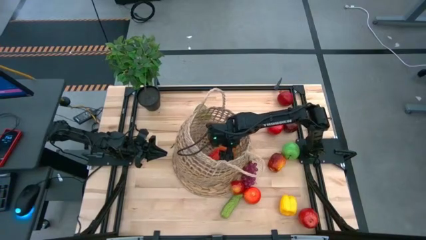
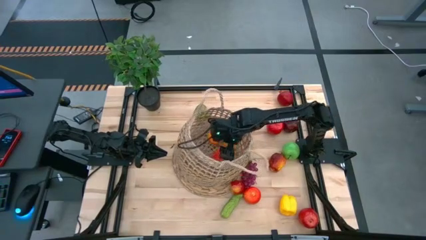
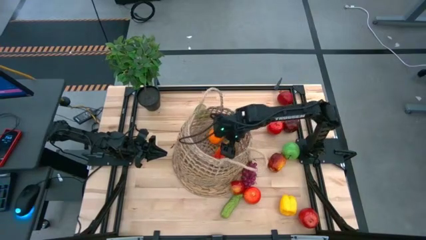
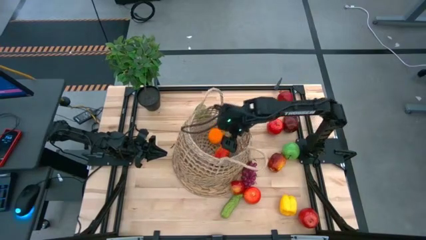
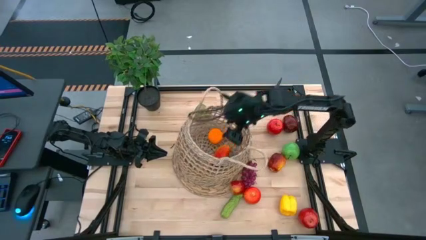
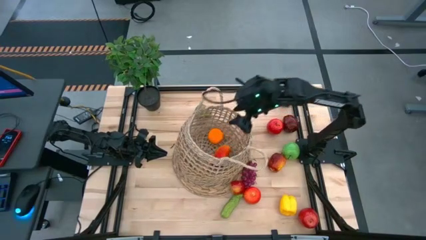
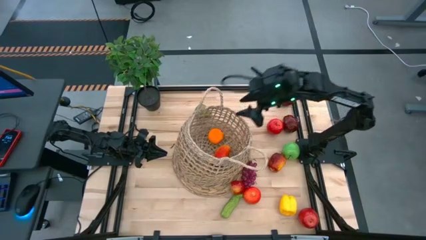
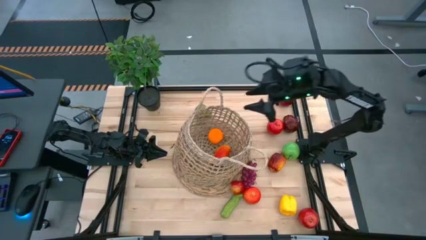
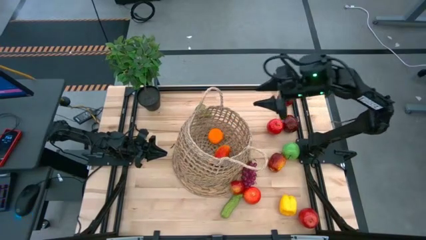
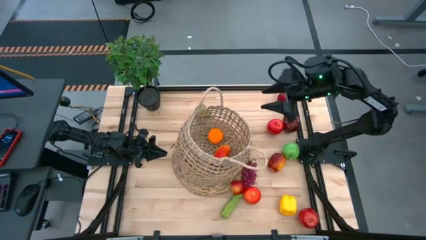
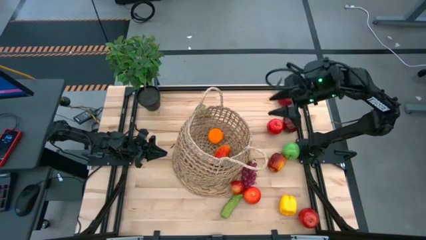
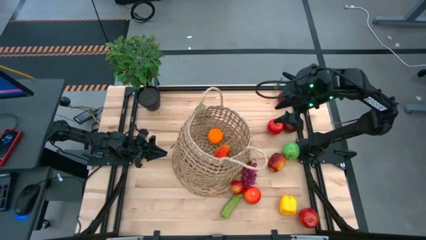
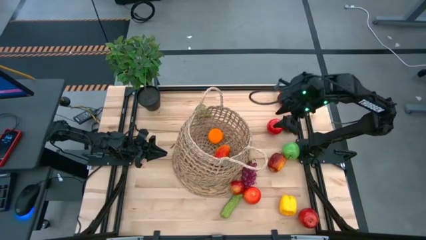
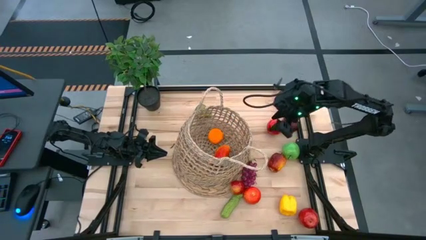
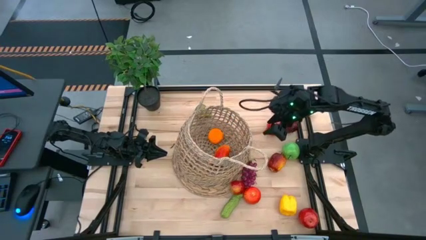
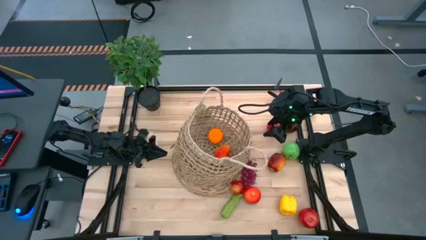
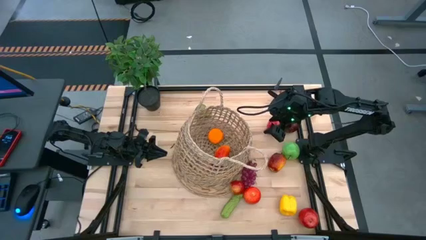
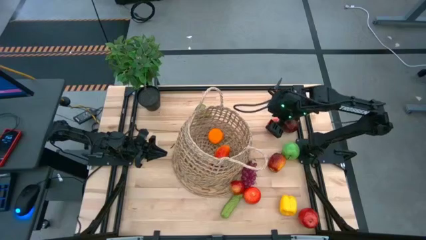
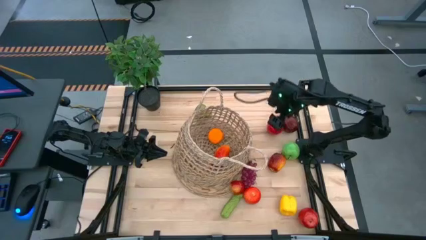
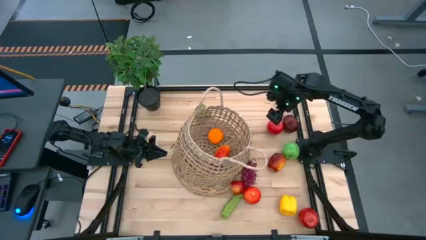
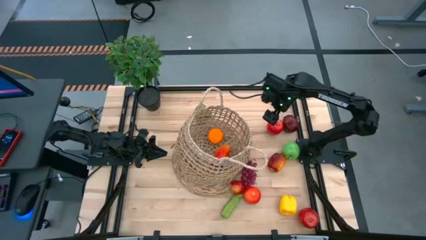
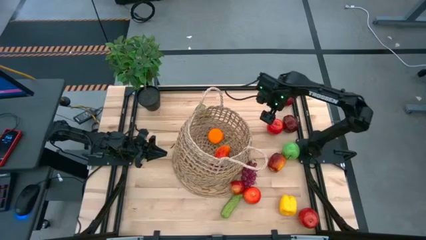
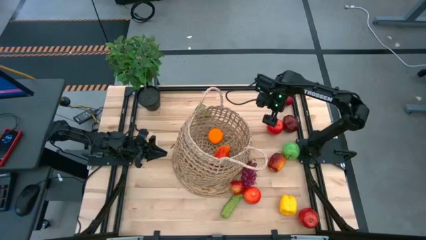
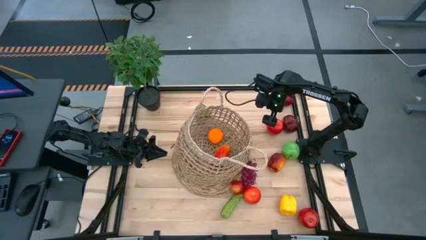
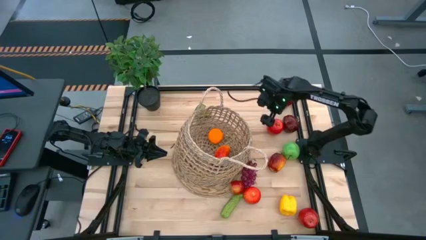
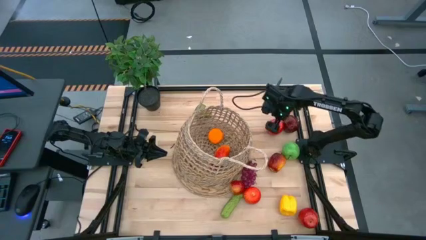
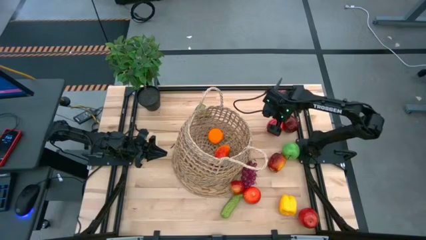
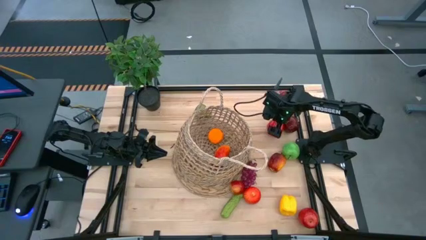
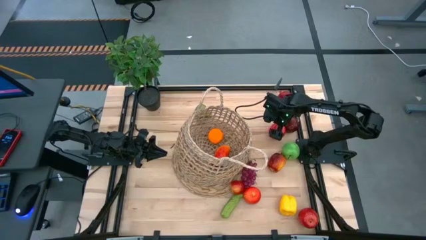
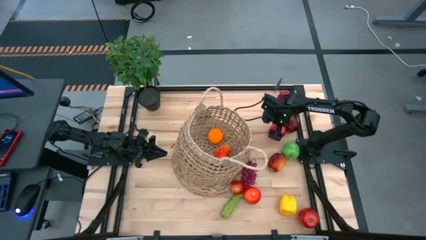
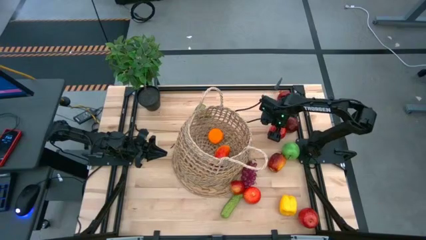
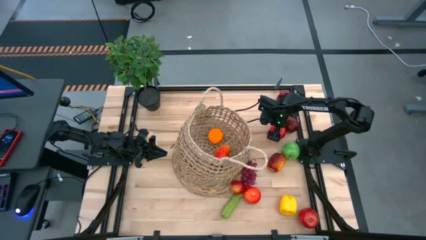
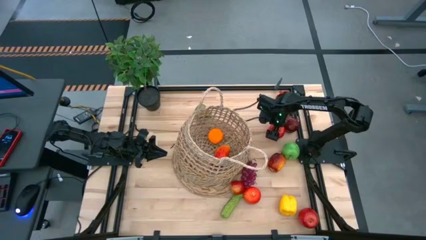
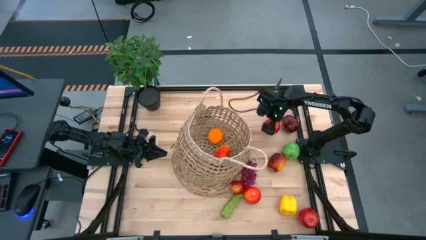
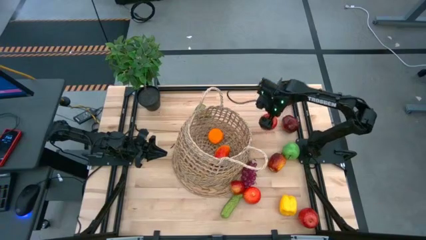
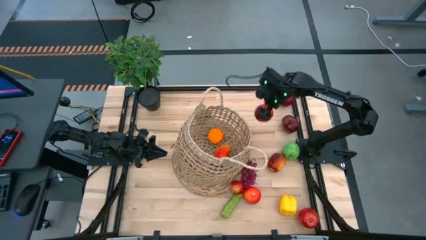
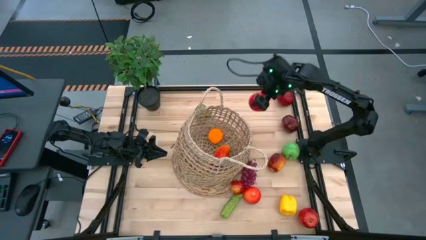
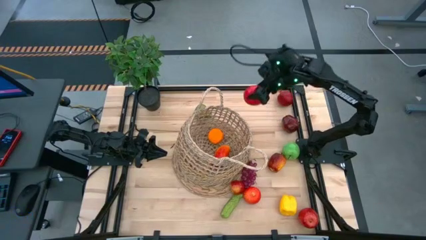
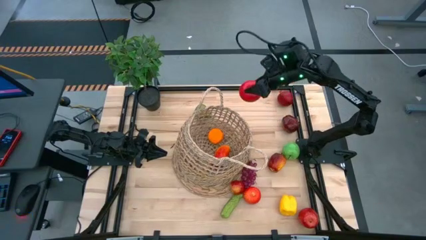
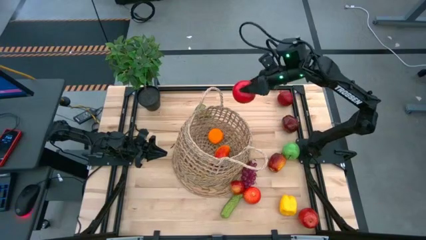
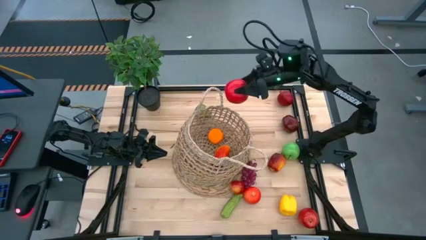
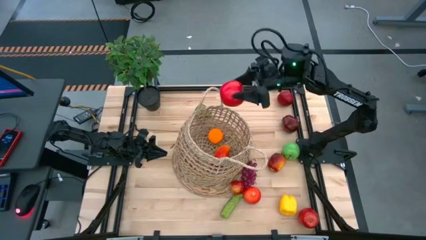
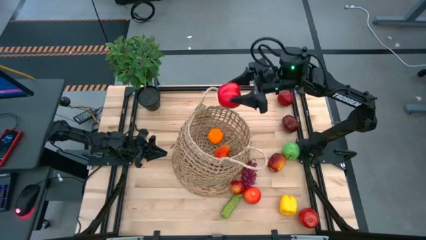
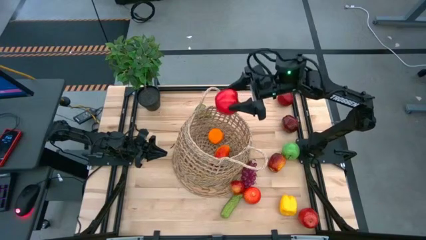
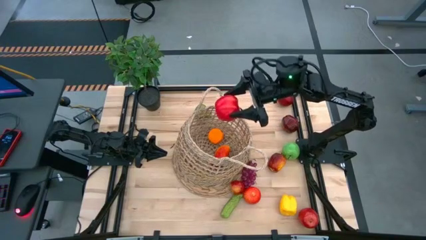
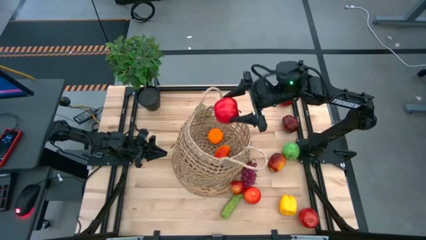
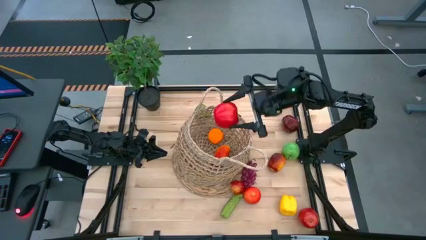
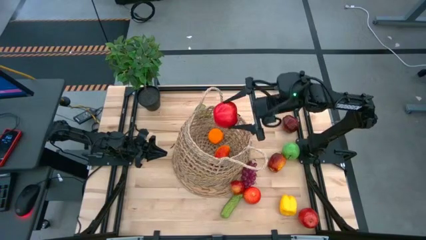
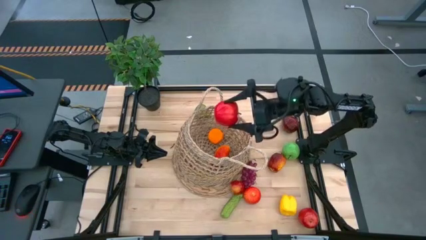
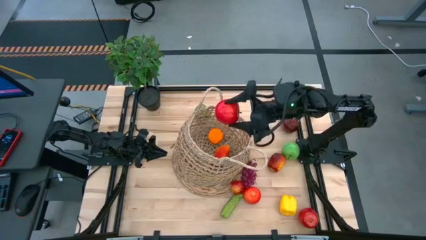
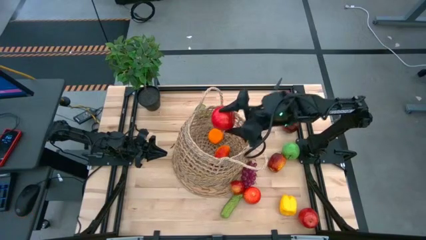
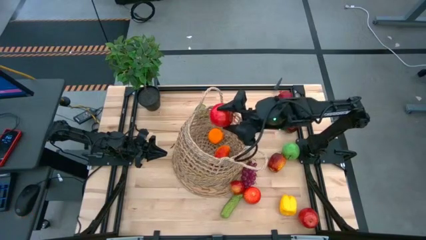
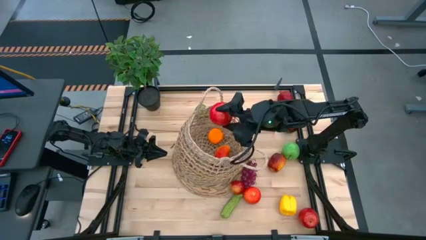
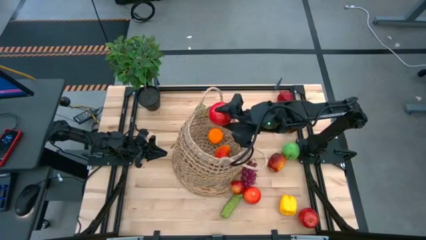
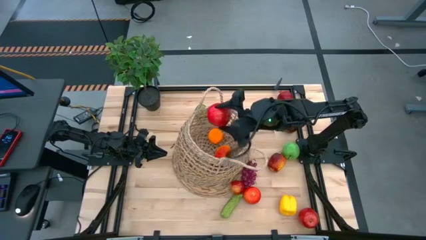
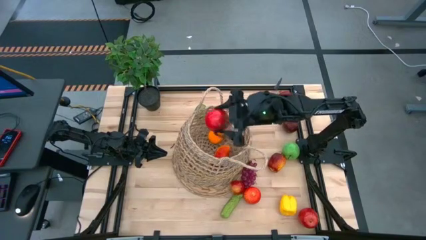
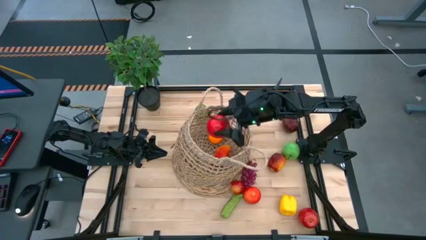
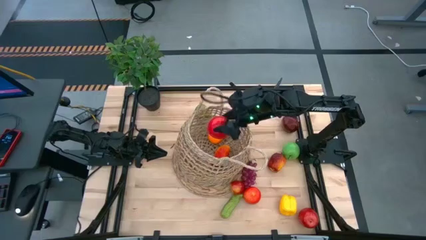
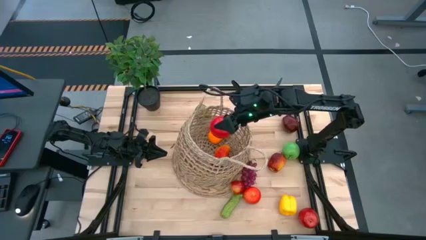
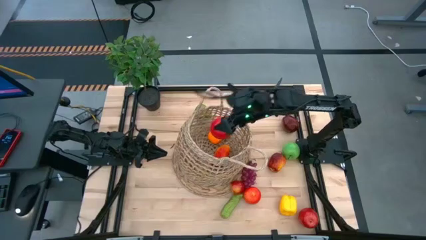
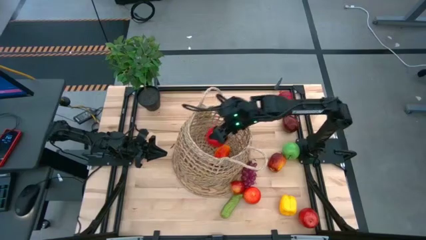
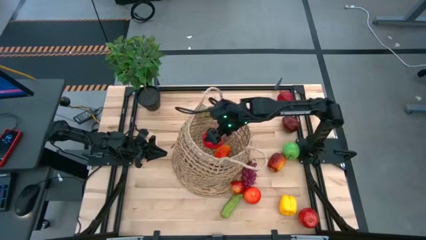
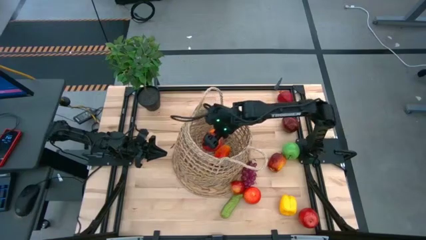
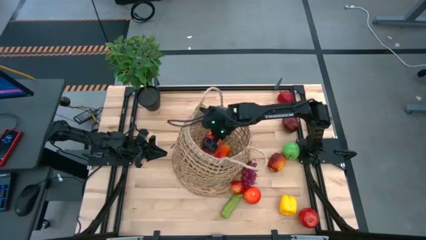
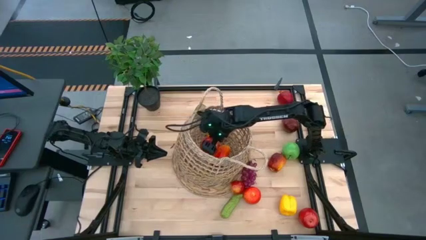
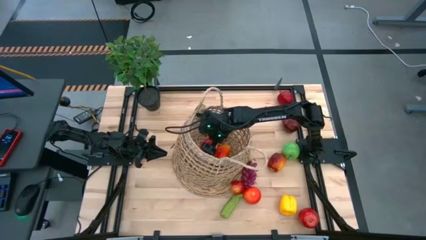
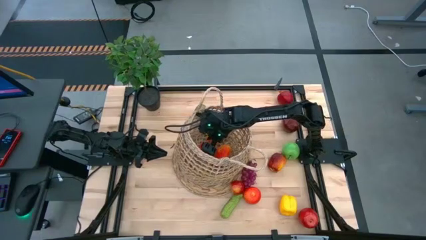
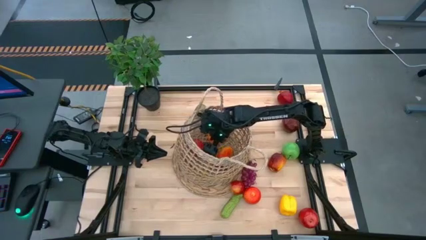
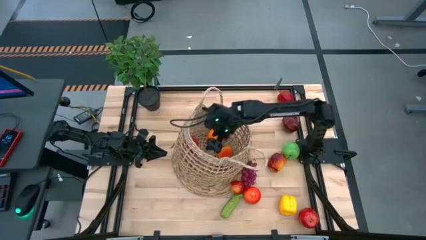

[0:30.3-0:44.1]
Task: Build produce basket
Put the red apple into the brown basket

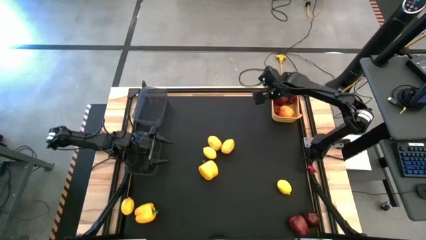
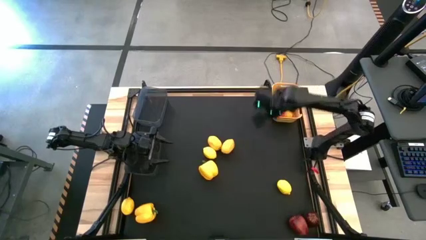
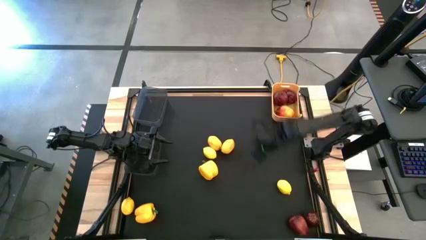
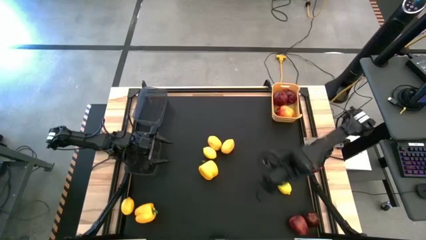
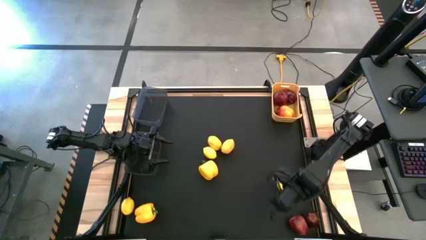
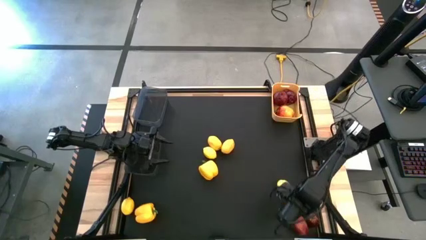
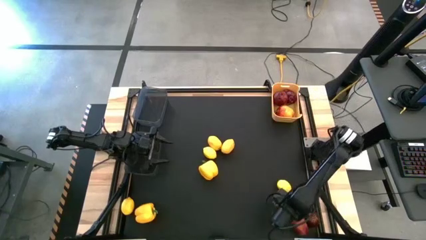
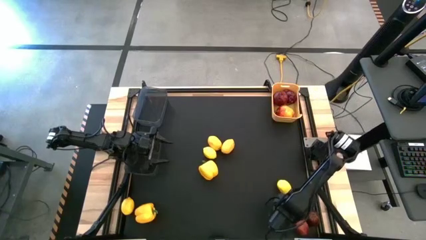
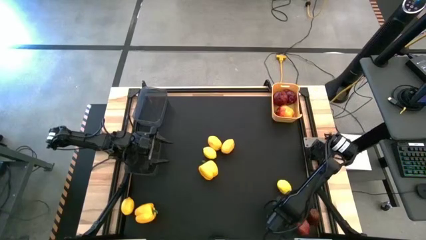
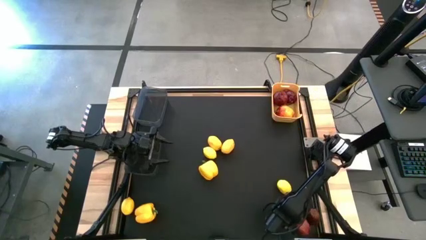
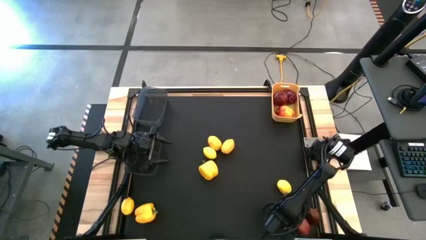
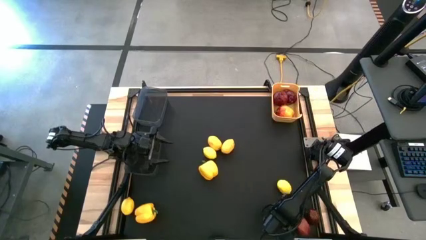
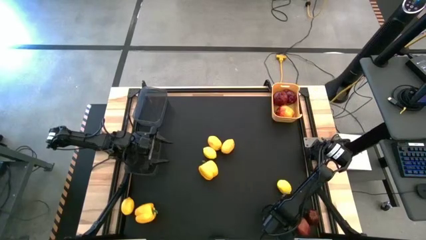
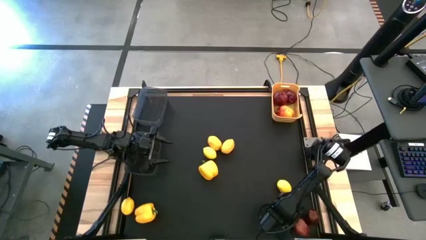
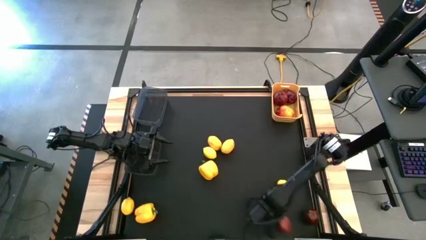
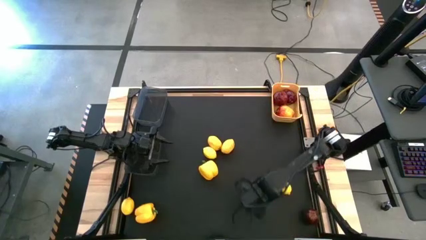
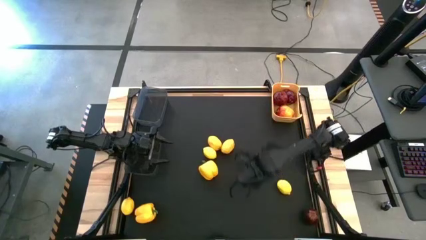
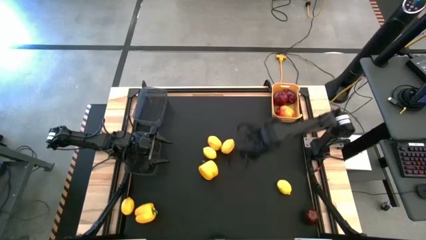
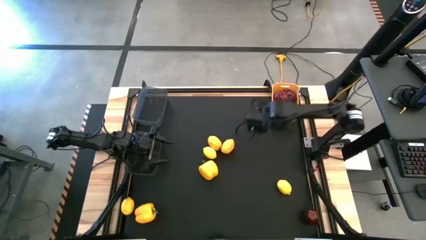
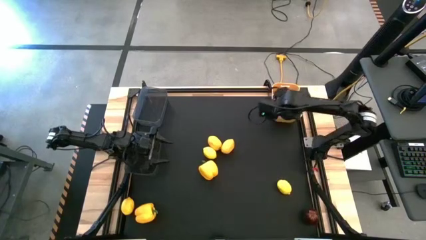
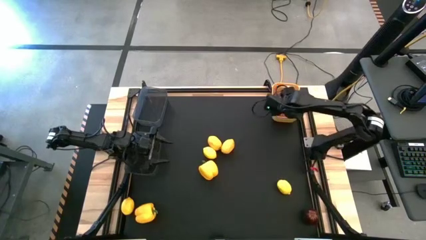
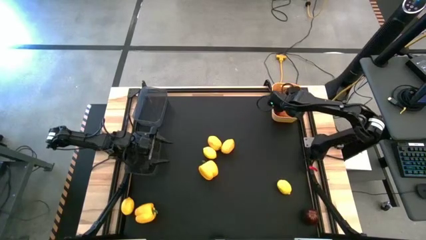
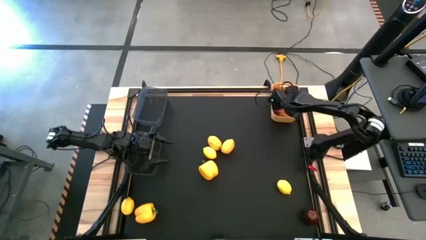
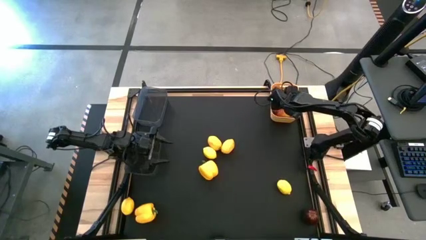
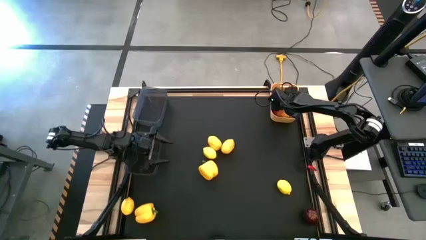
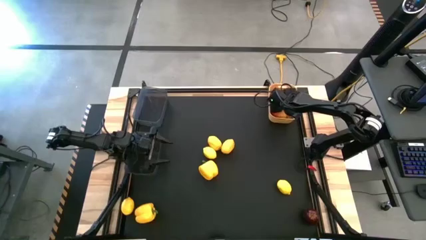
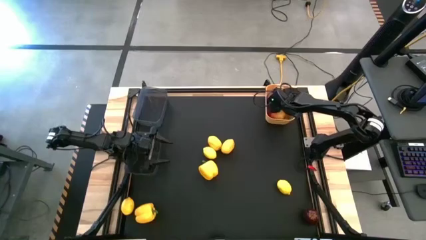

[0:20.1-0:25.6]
Task: Sort produce into baskets
Put the apple into the yellow bin
